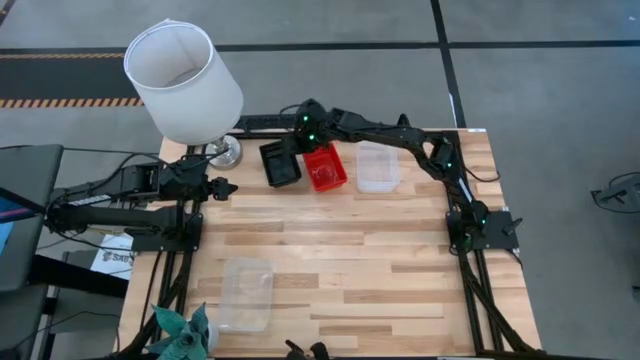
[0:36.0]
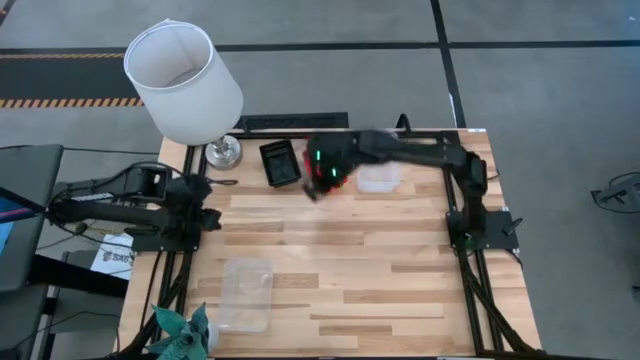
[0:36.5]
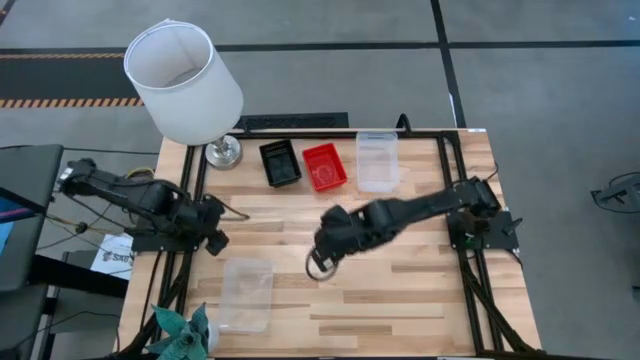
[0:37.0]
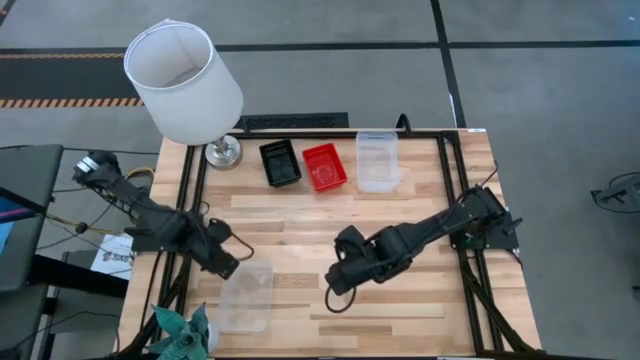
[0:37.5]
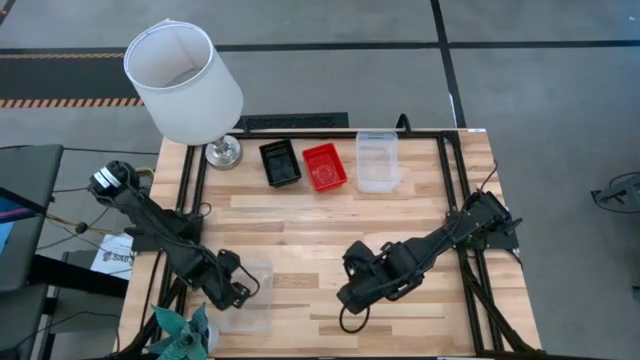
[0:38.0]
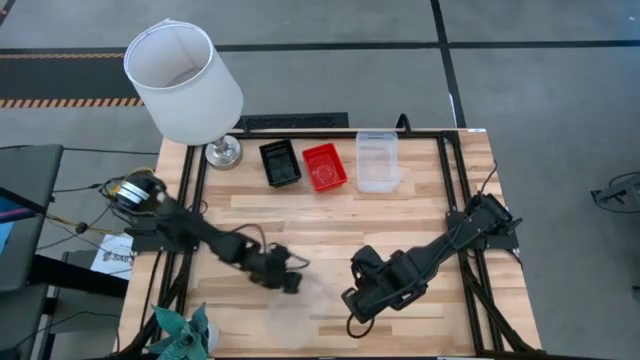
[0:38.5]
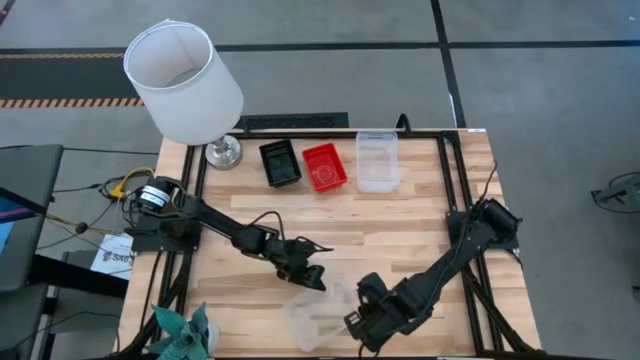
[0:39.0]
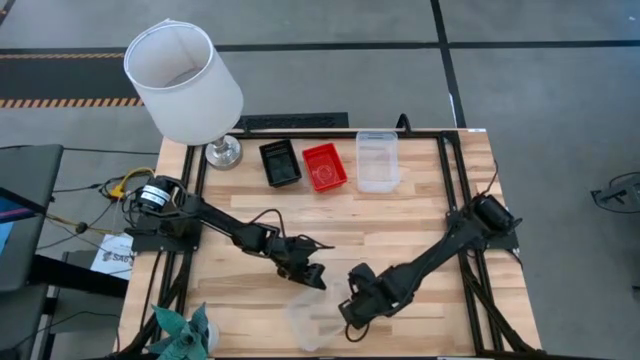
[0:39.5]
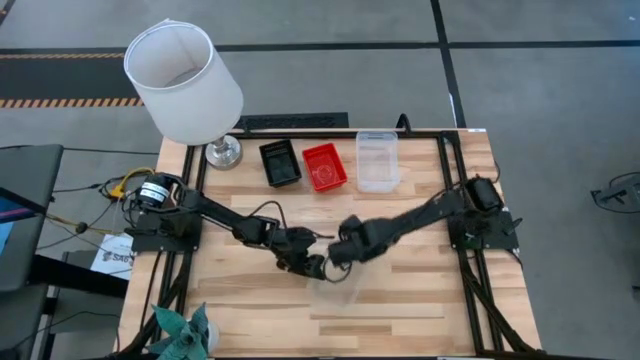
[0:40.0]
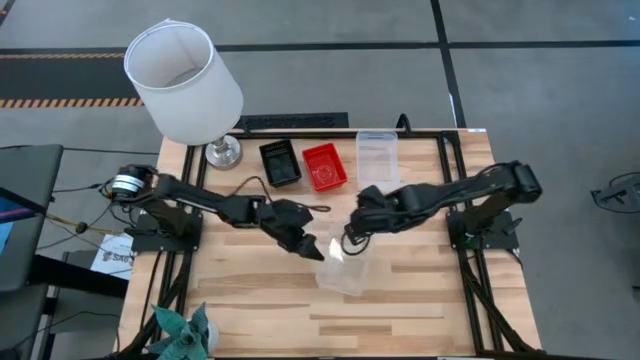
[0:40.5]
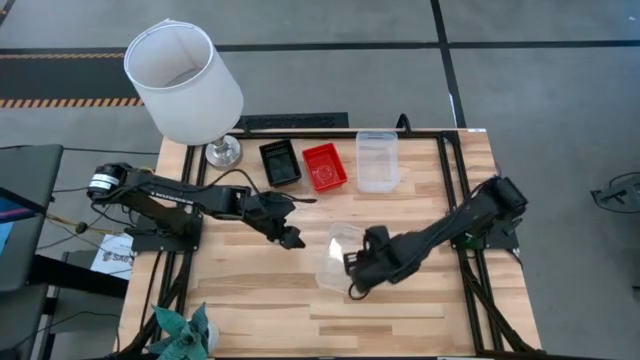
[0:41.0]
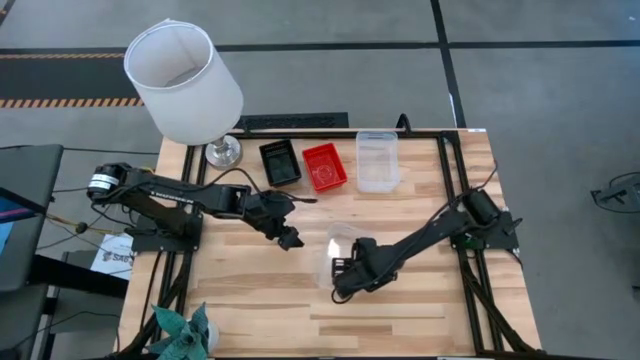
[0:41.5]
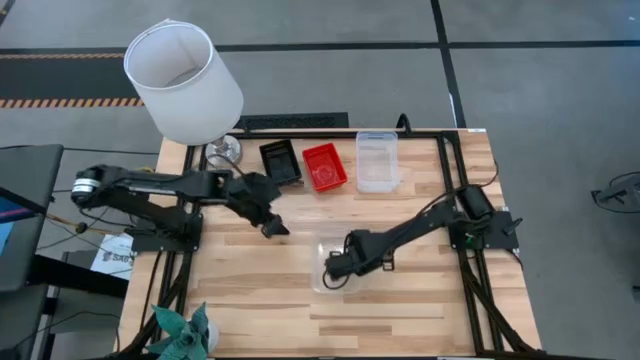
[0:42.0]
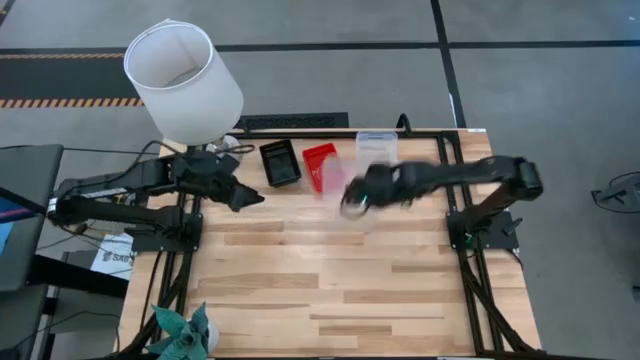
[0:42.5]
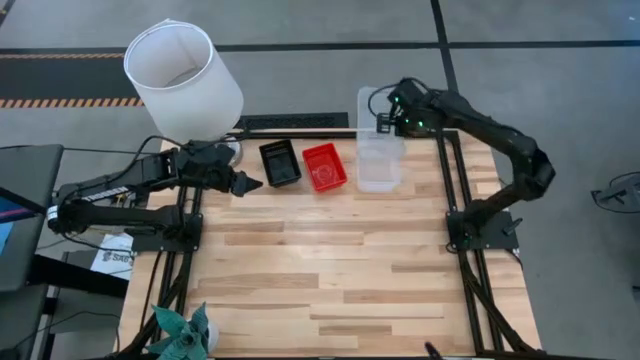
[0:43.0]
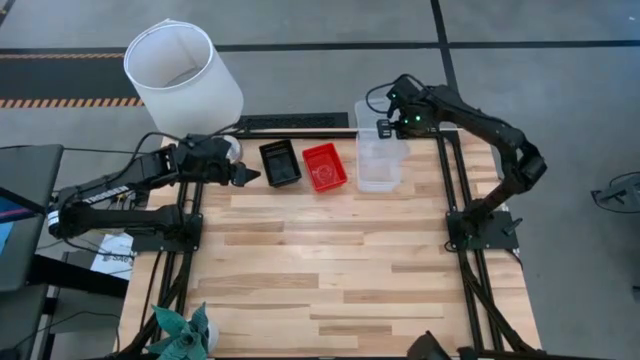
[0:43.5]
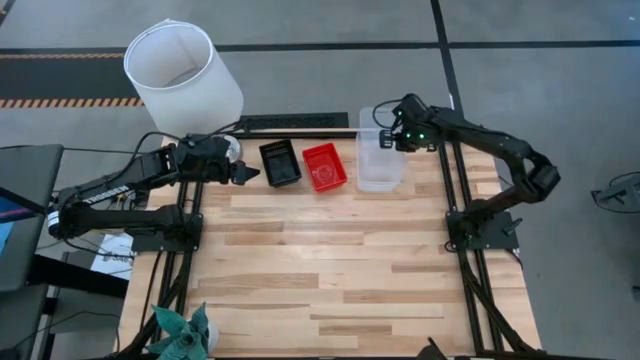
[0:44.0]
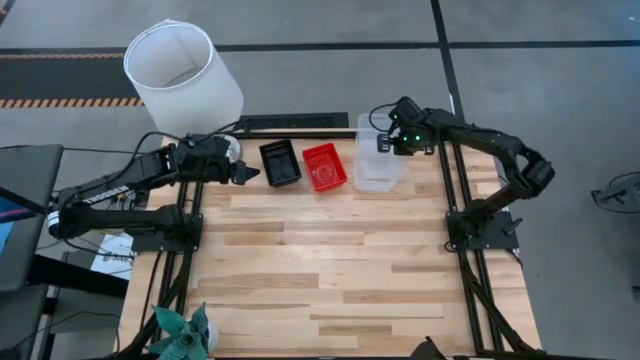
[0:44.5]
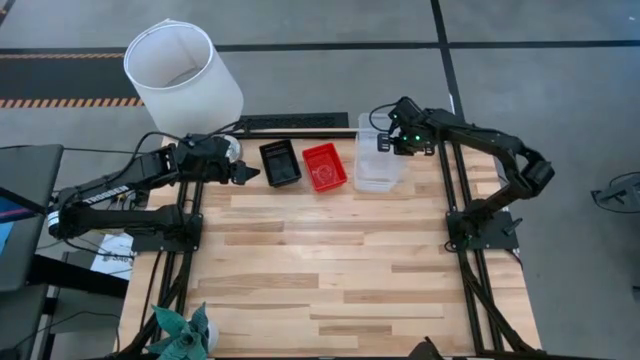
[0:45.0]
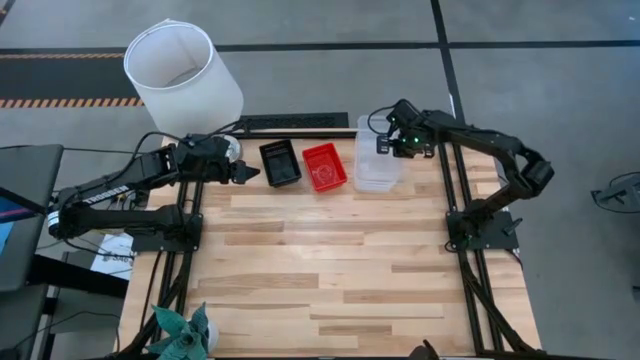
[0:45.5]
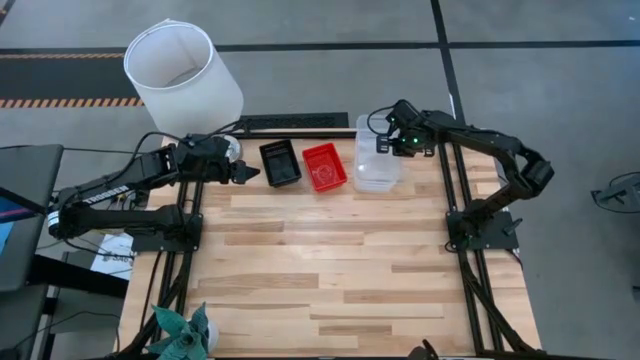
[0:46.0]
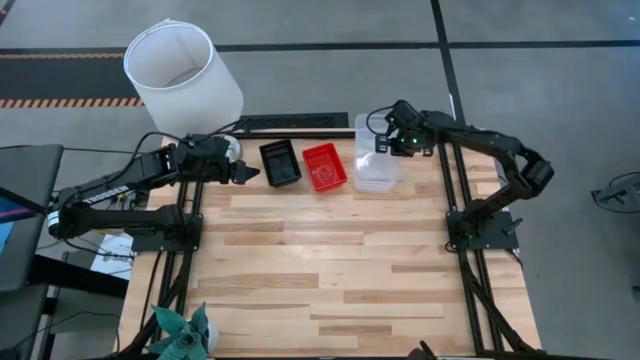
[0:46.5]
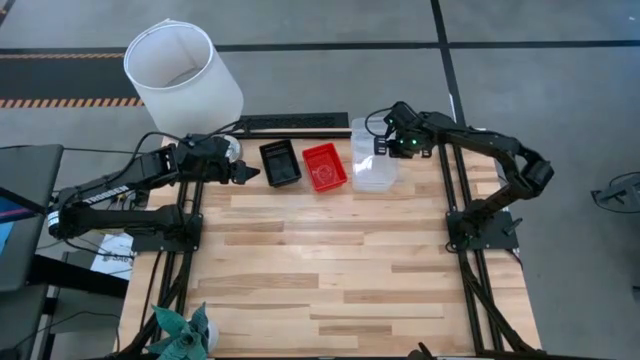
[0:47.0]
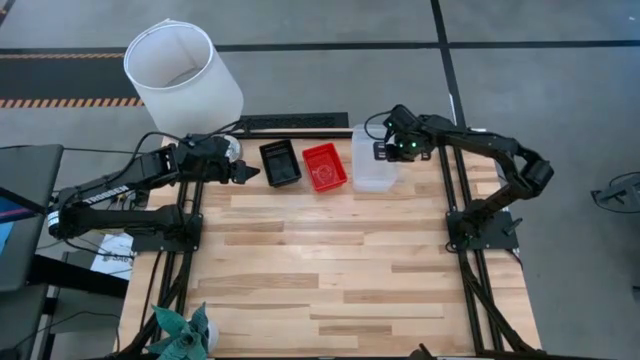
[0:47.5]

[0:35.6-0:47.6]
Stack the bottom transparent bin on the top transparent bin

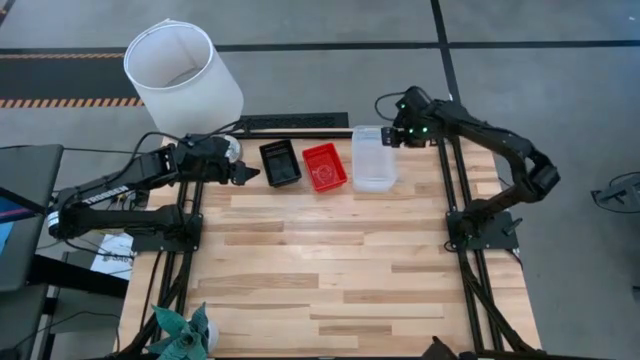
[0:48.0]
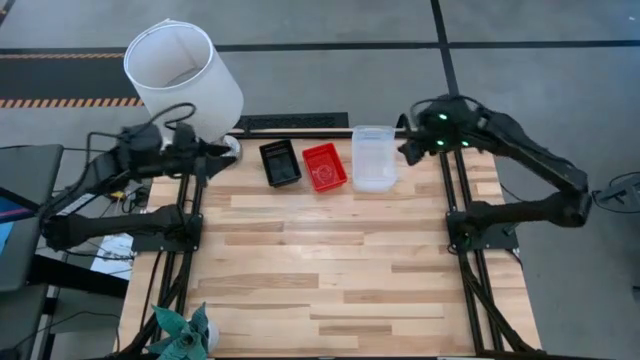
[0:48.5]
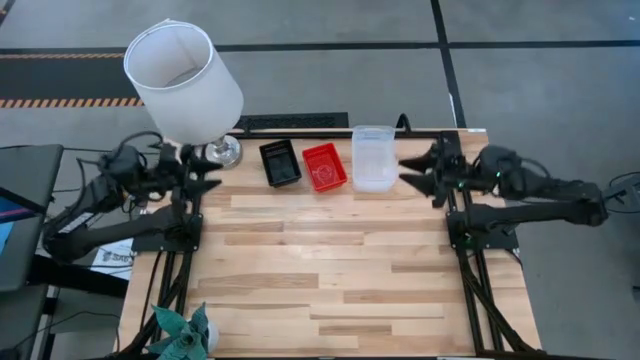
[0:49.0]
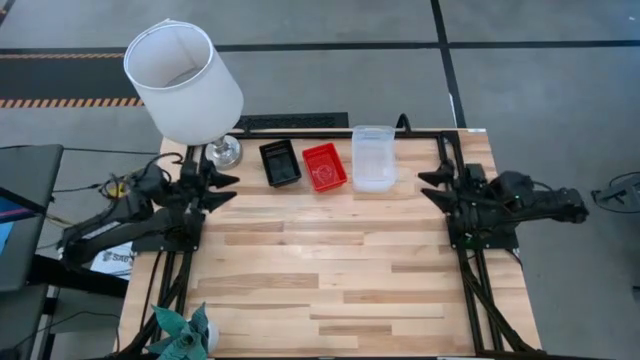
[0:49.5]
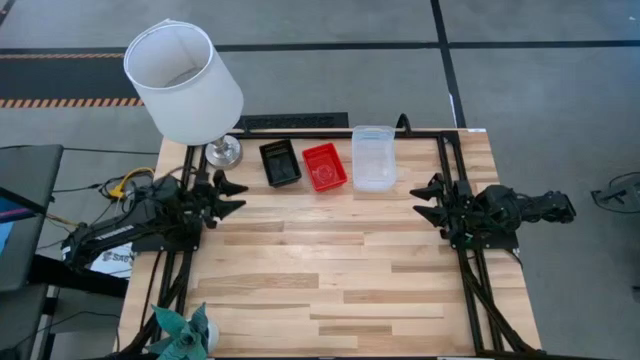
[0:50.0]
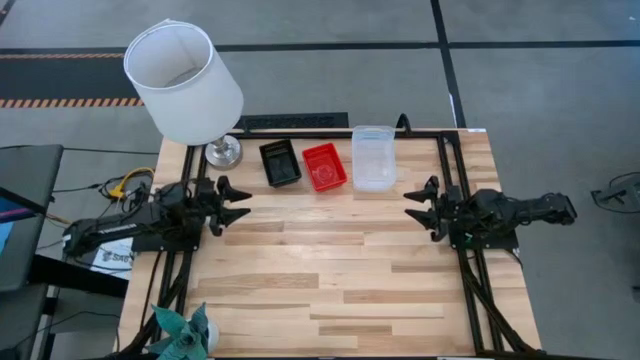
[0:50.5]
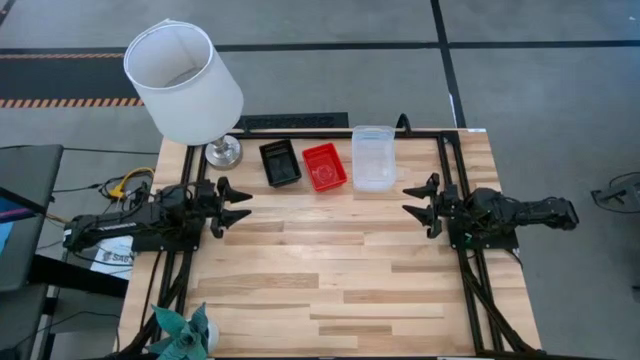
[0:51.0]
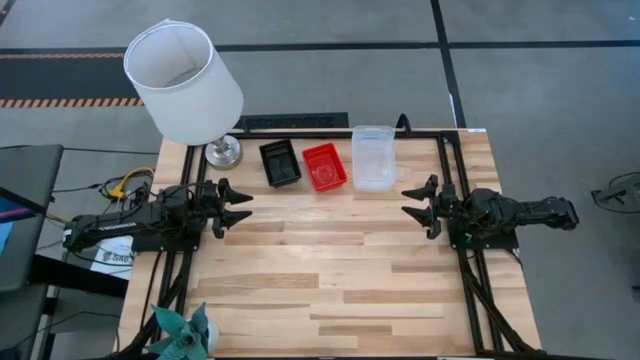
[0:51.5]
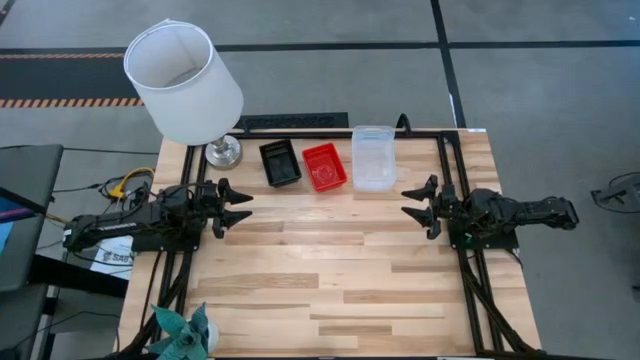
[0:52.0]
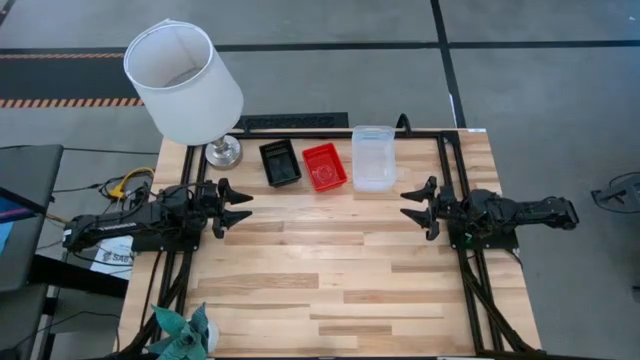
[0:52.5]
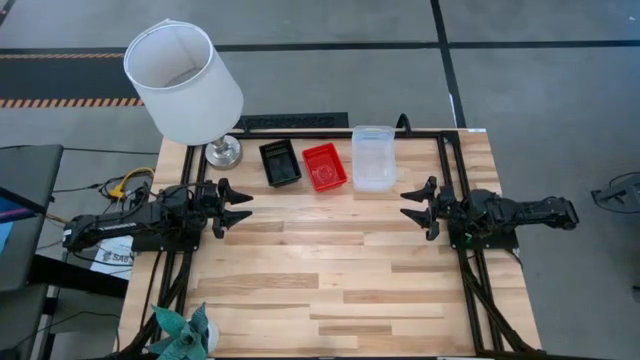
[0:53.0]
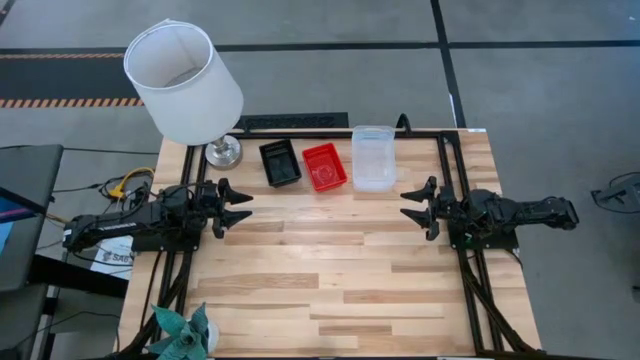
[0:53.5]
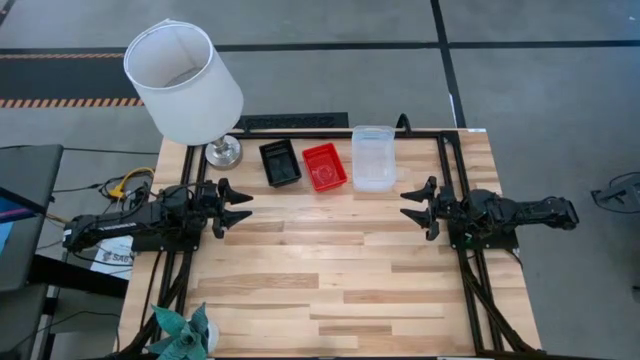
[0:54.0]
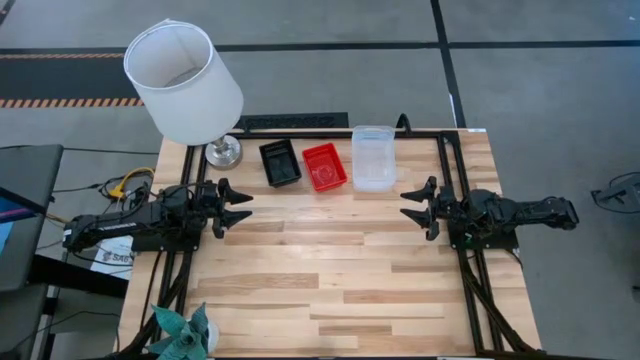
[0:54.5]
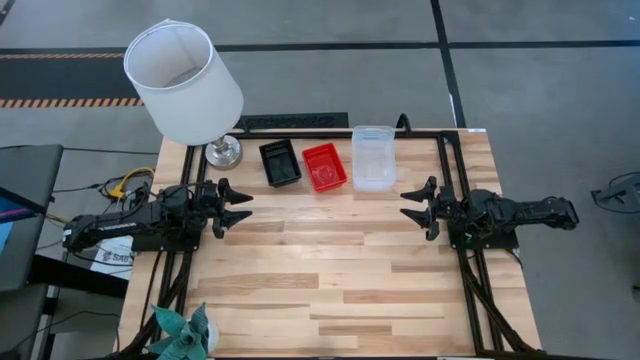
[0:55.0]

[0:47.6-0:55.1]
Return to Home Position
